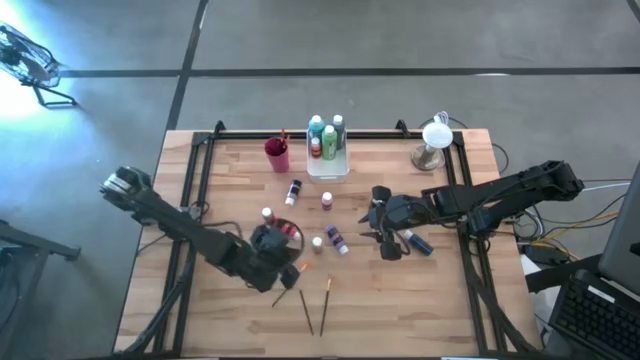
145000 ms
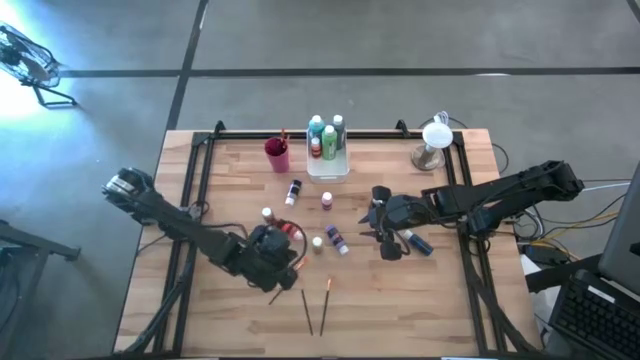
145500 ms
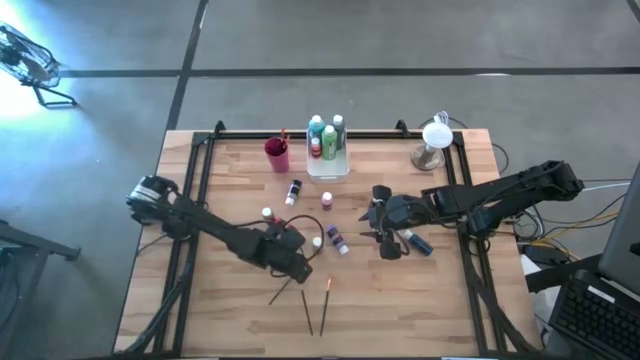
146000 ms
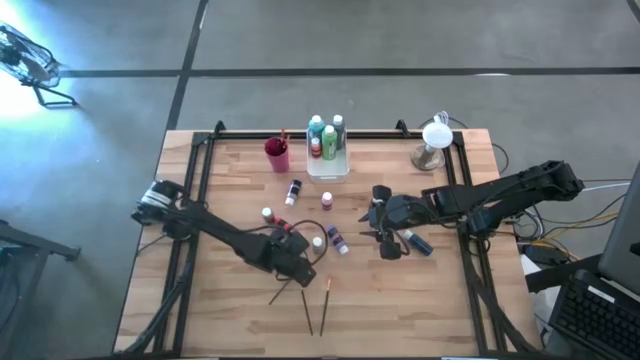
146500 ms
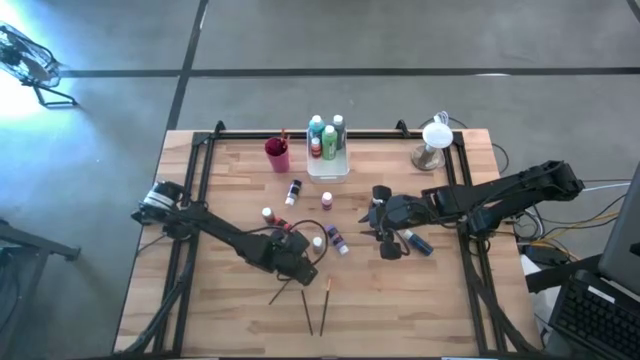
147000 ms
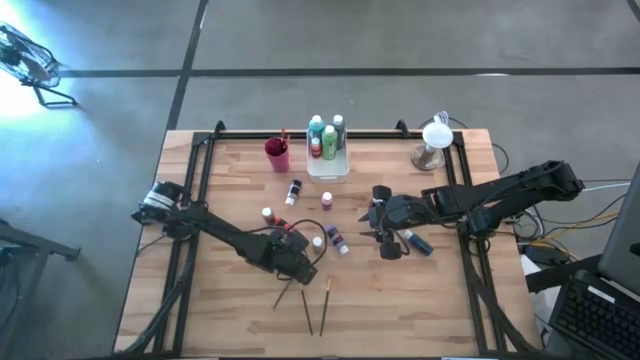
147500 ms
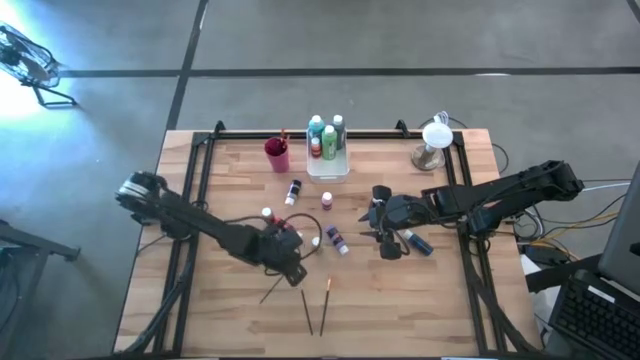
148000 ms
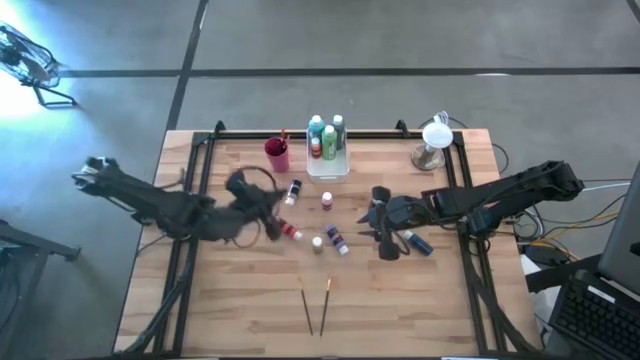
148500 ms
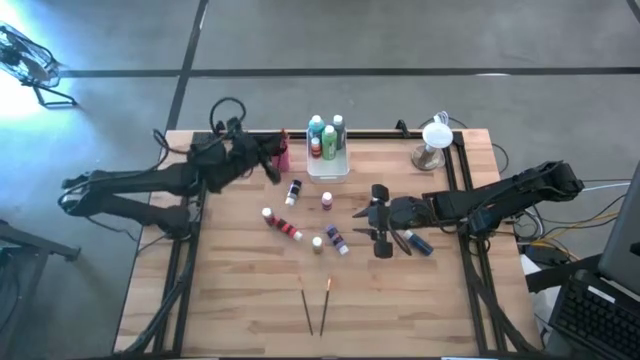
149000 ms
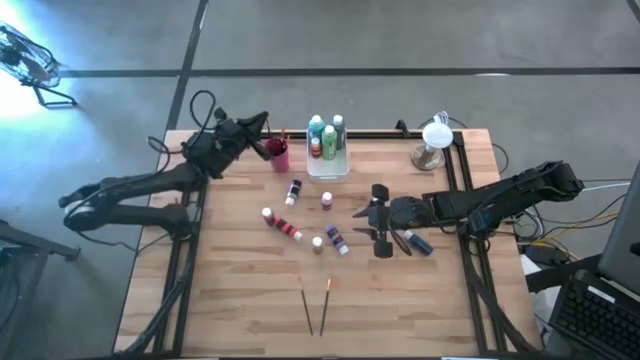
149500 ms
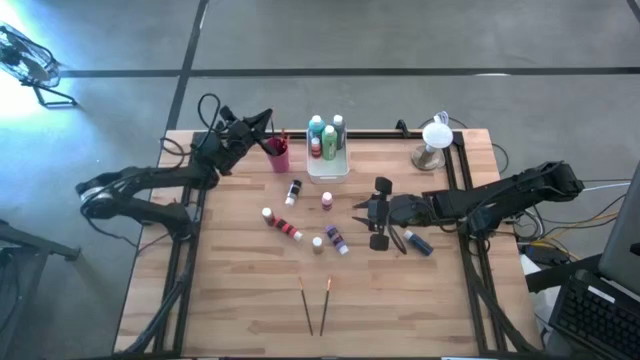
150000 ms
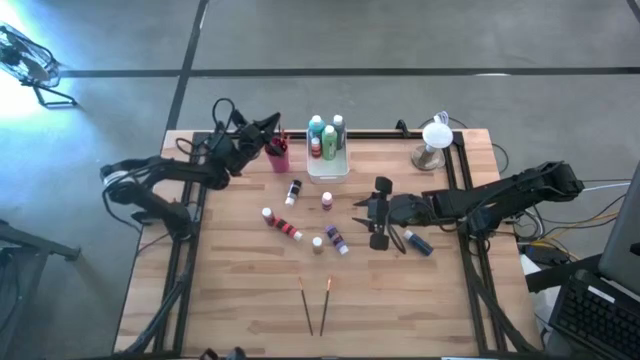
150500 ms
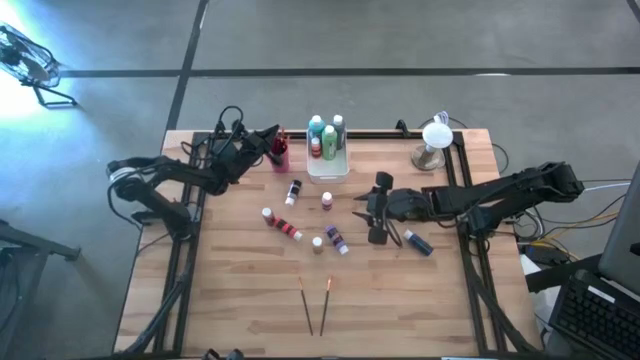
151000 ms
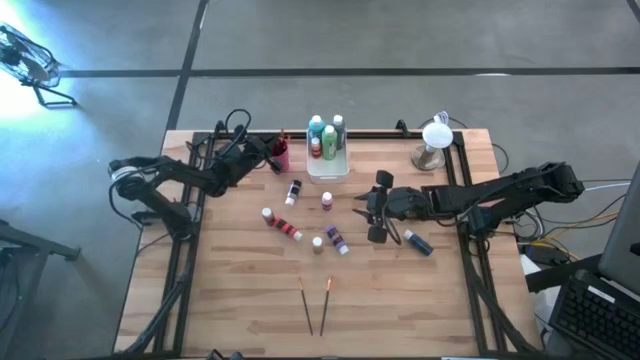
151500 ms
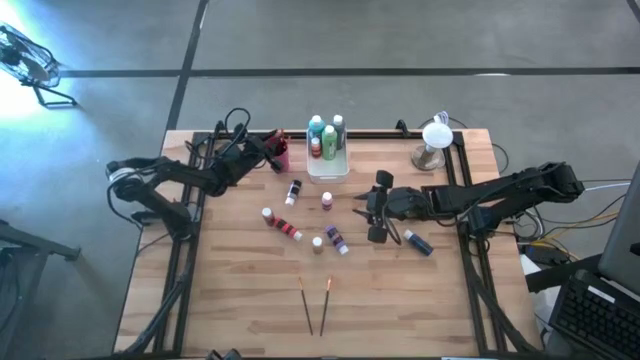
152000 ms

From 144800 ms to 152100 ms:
Task: Pick & Place Paint Supplies
Put the gold paint brush into the pink cup

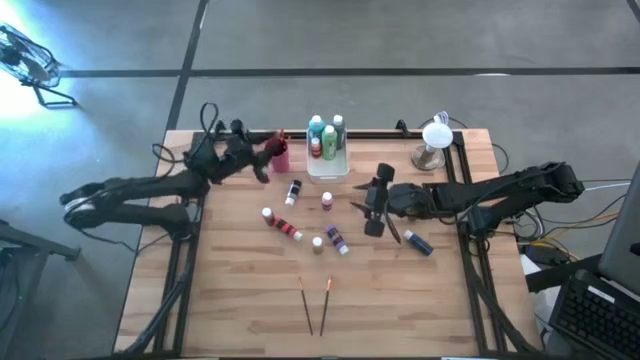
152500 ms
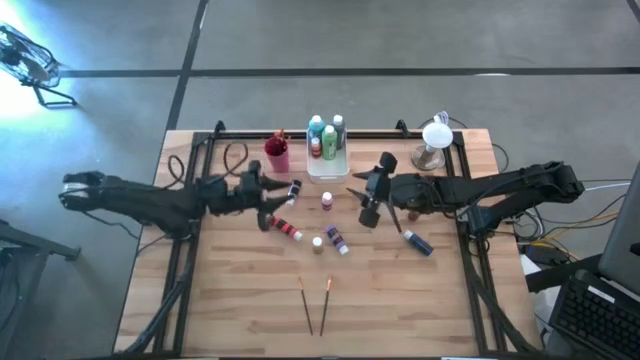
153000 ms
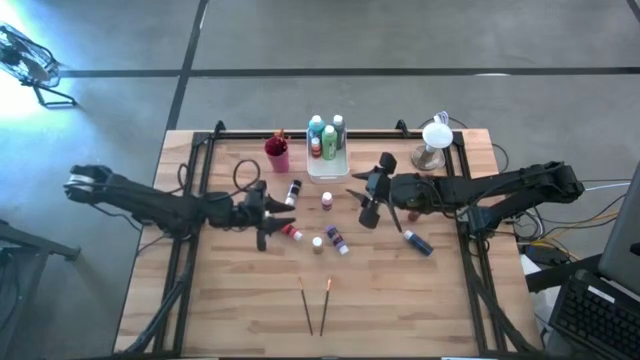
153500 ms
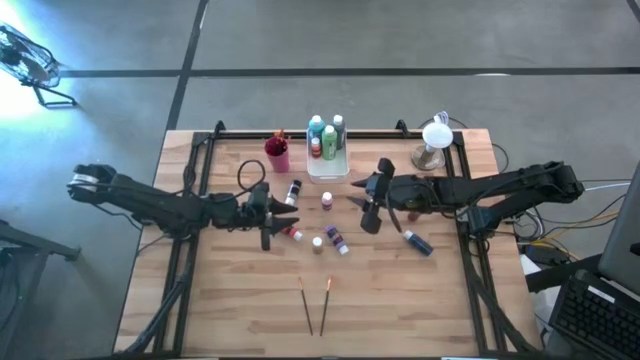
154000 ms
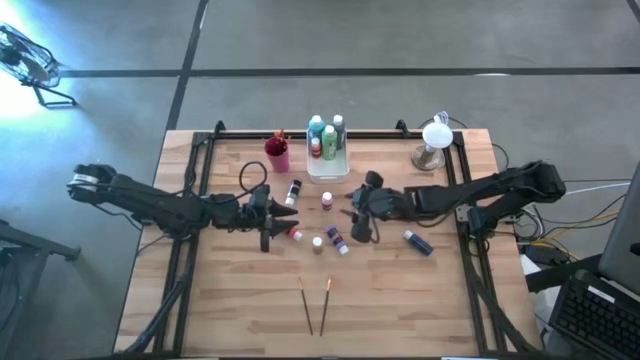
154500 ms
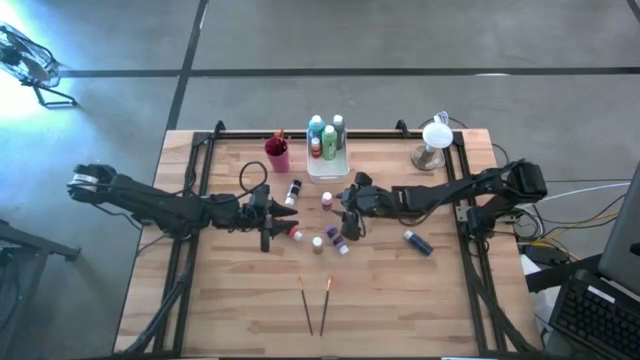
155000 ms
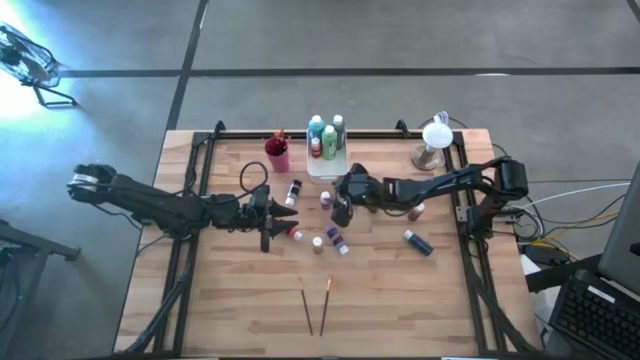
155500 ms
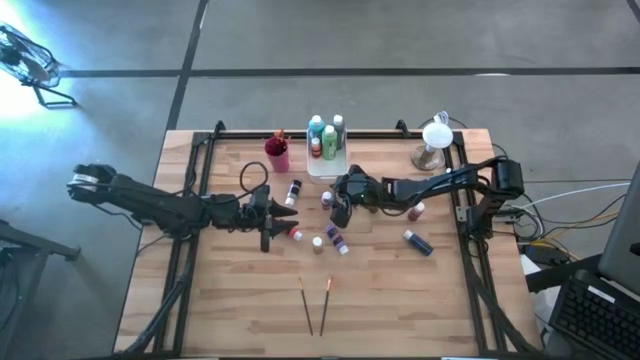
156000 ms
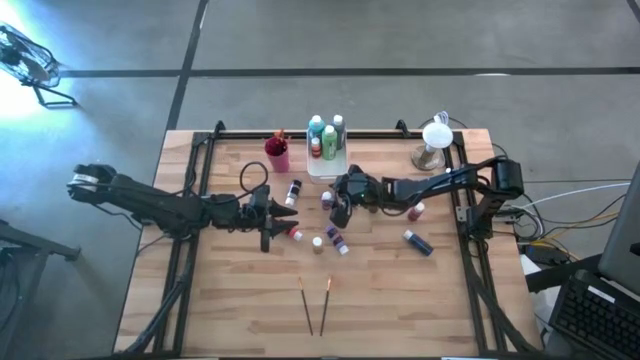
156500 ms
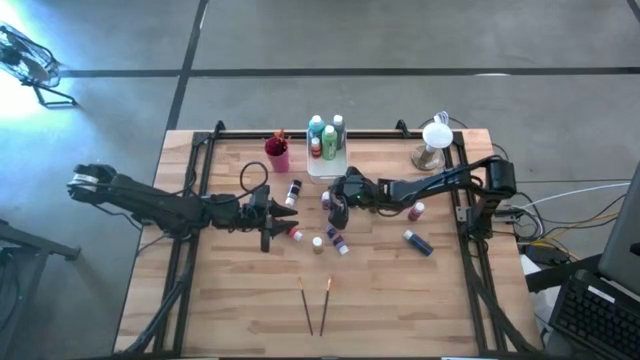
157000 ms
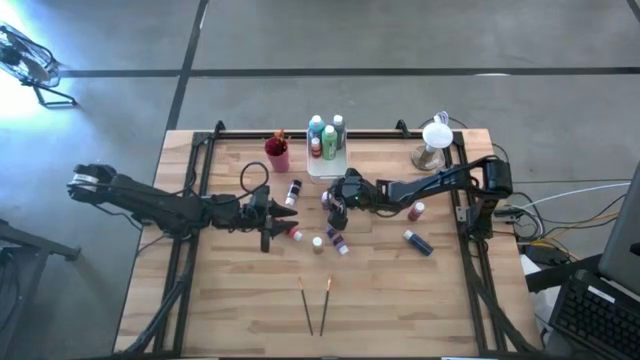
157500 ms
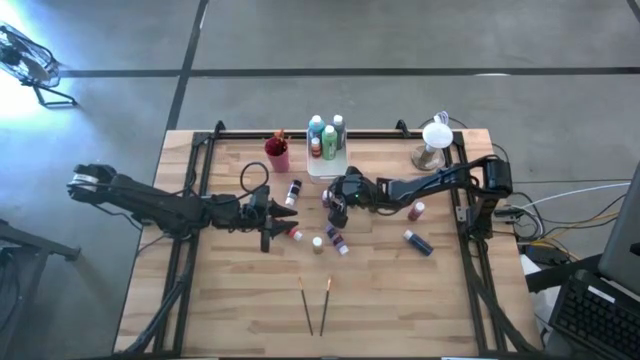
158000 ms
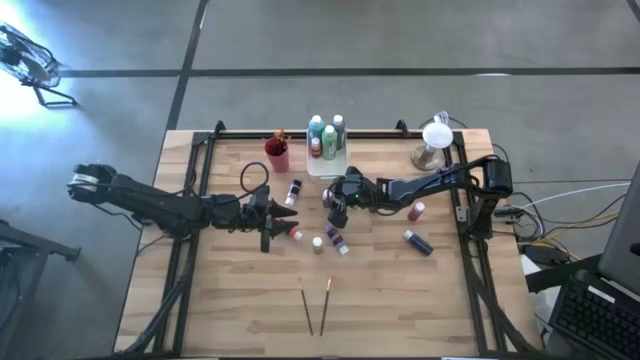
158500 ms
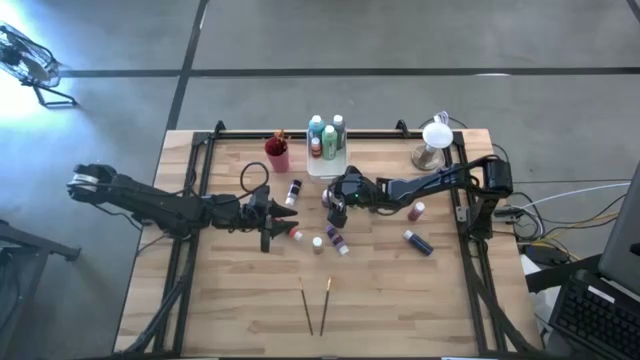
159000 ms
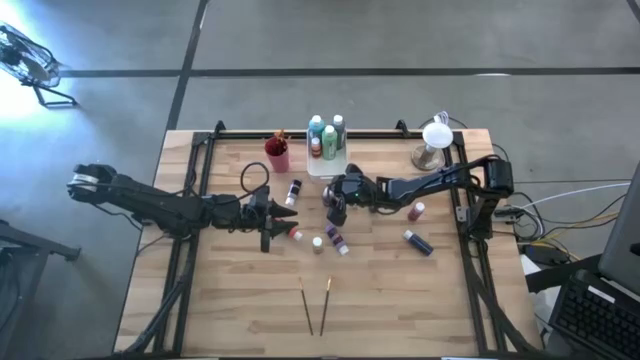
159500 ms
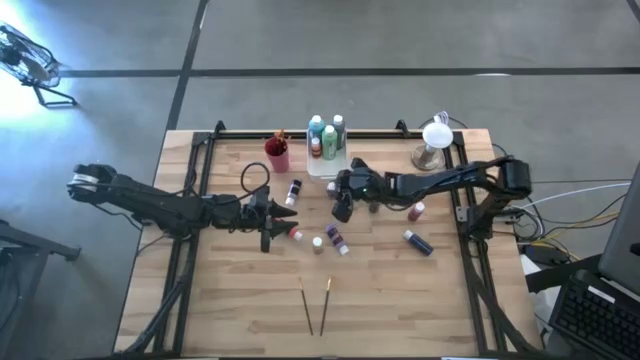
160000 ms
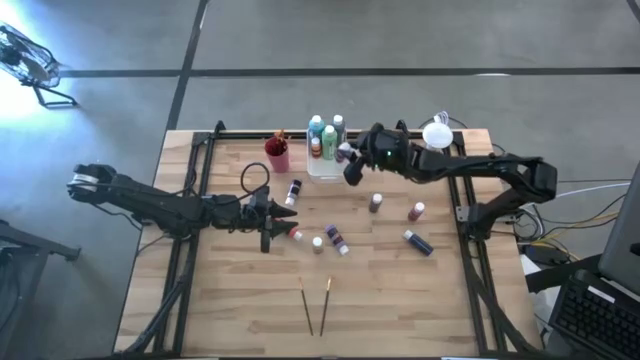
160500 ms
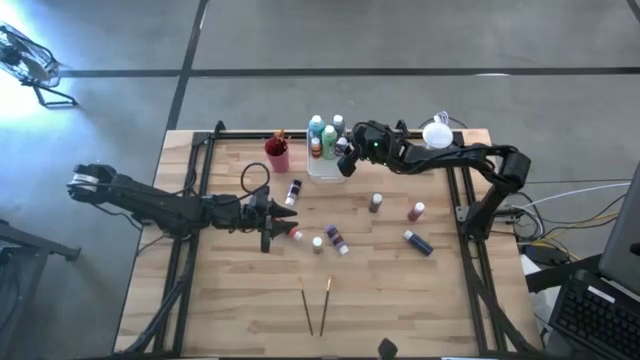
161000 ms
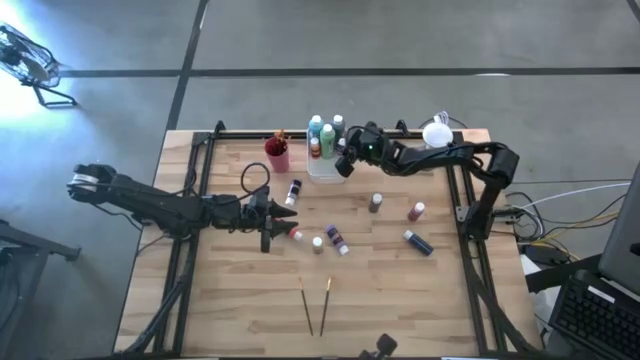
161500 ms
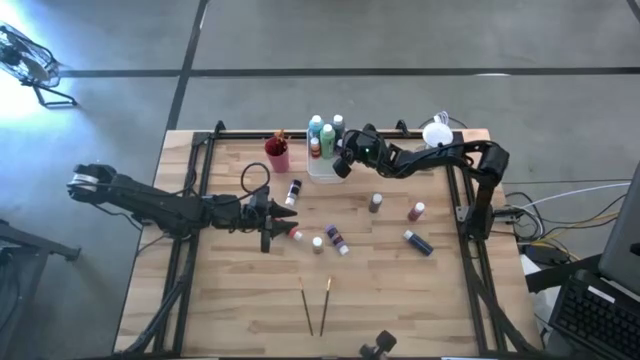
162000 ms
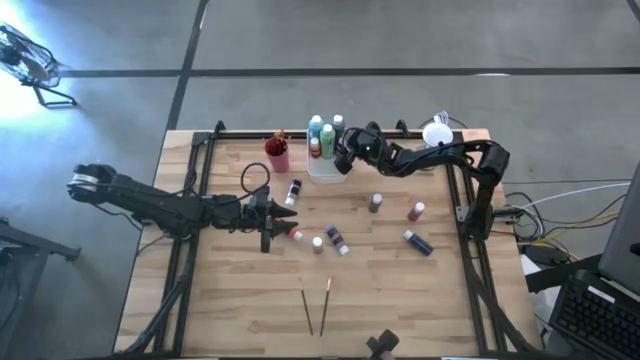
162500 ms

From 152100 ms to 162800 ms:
Put the pink paint bottle into the white bin

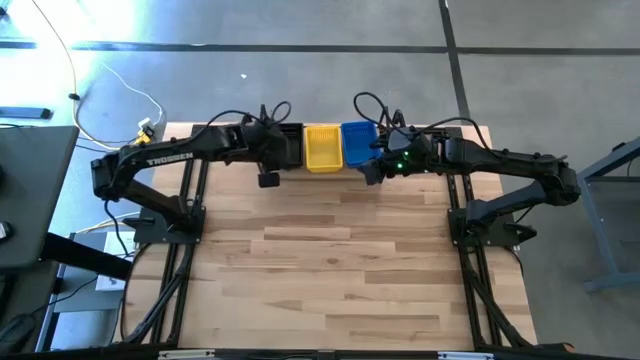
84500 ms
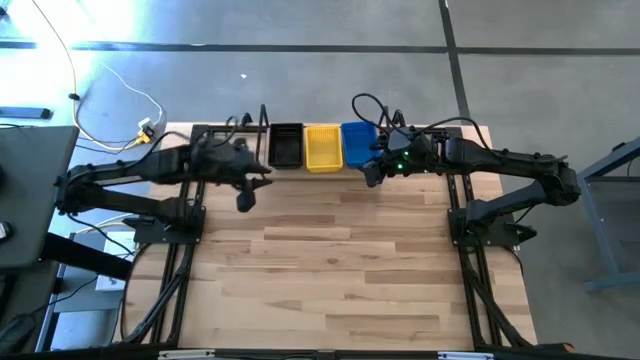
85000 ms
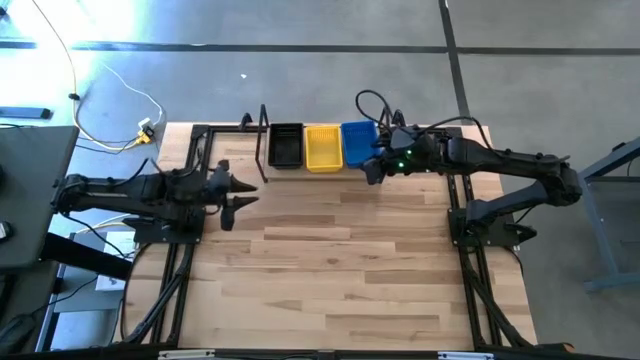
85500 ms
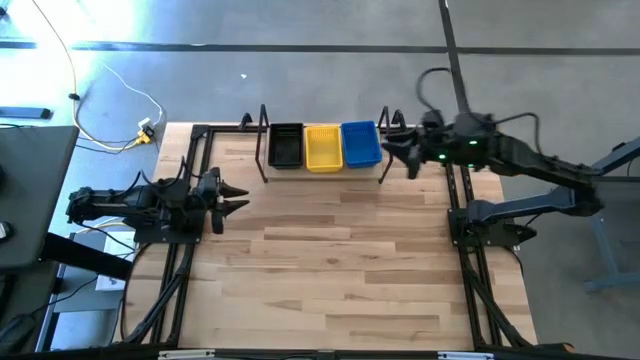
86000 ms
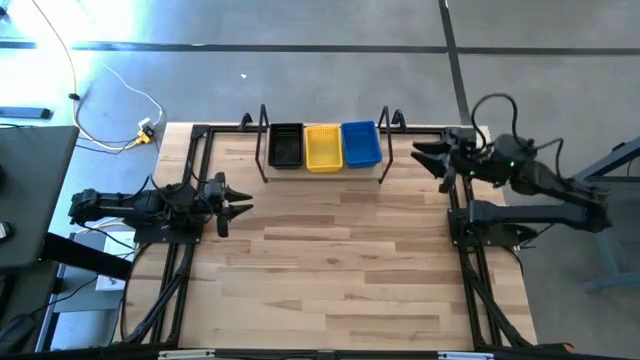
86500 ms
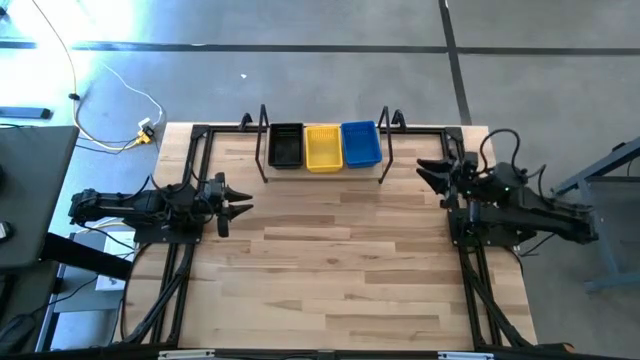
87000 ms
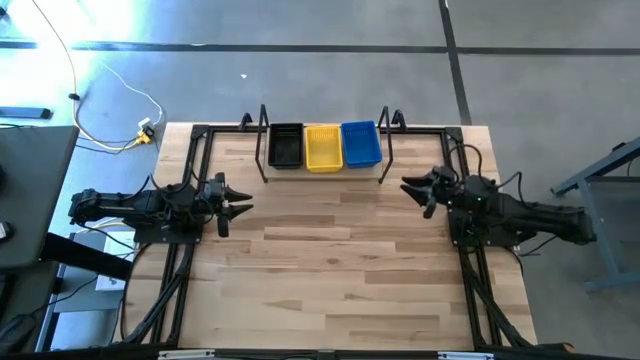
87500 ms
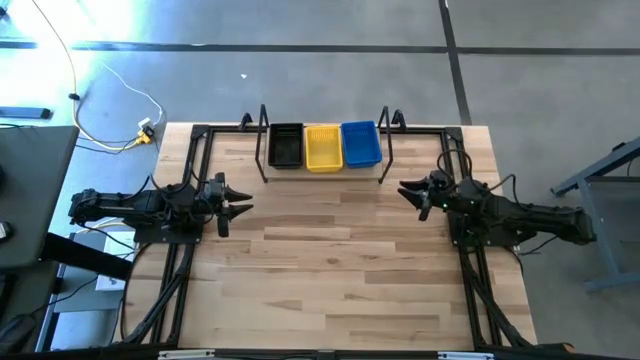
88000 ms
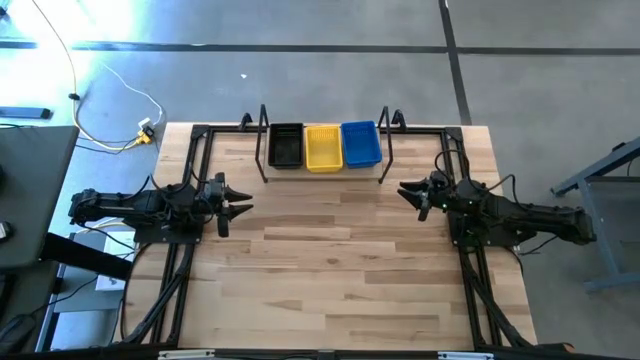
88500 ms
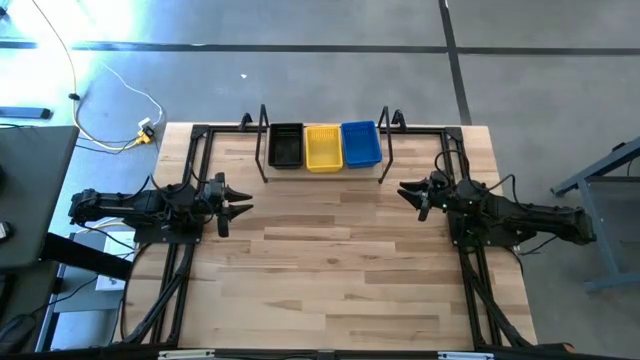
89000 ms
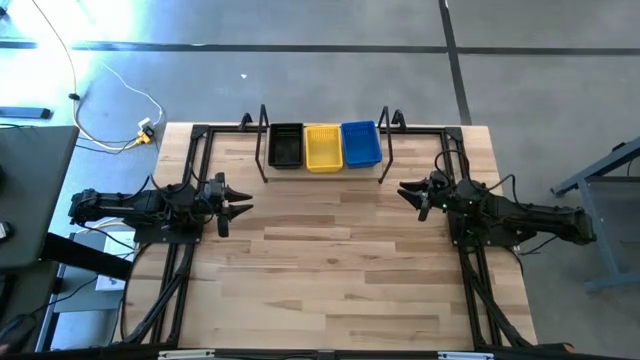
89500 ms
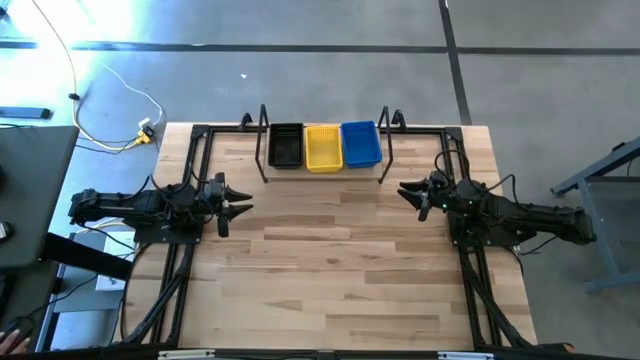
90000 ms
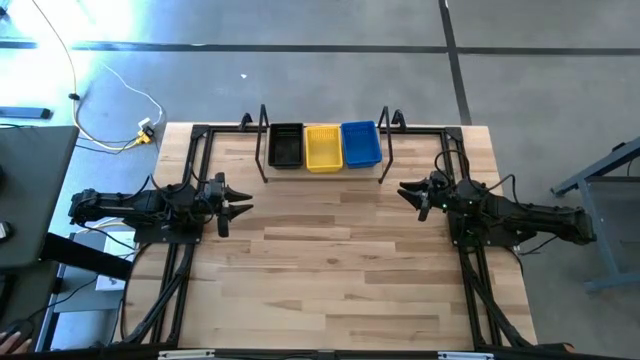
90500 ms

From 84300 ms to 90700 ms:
Task: Stack baskets on shelf by color
Return to Home Position
